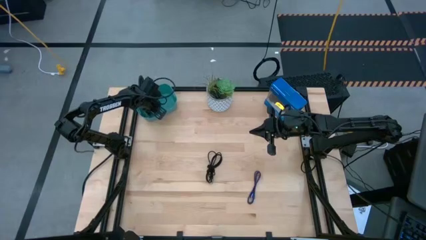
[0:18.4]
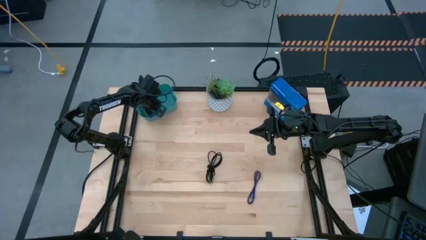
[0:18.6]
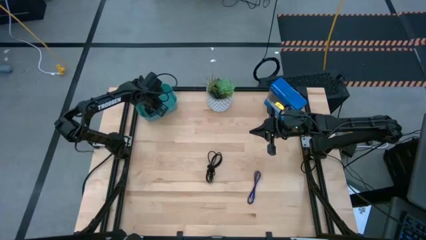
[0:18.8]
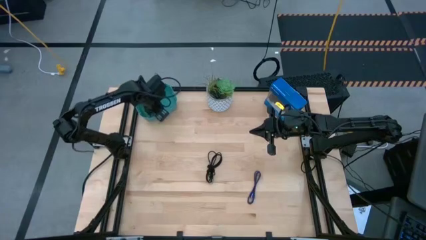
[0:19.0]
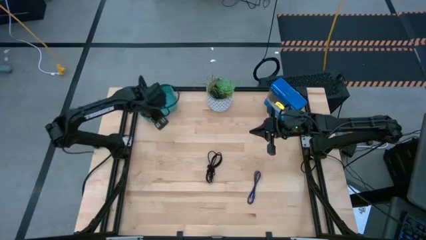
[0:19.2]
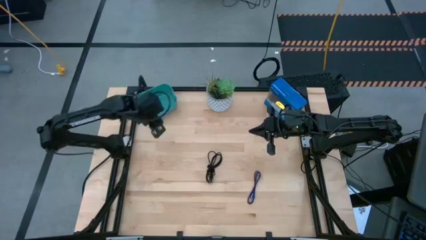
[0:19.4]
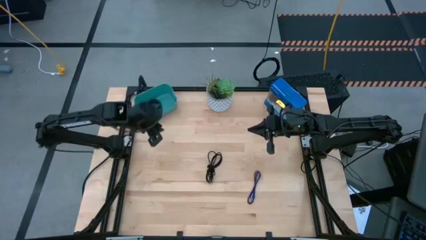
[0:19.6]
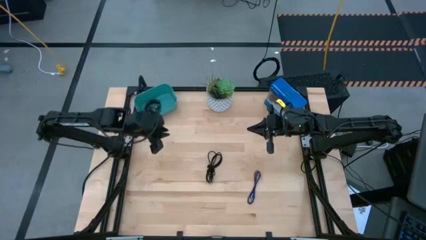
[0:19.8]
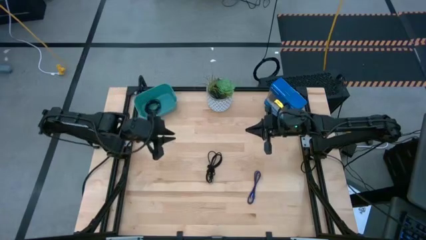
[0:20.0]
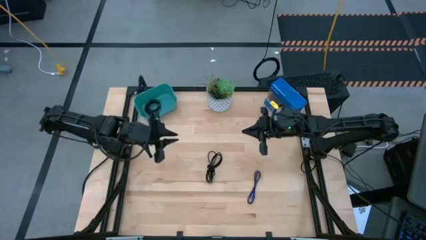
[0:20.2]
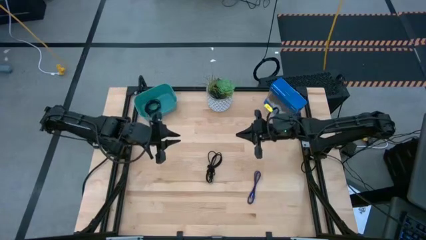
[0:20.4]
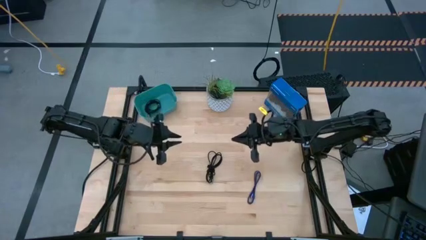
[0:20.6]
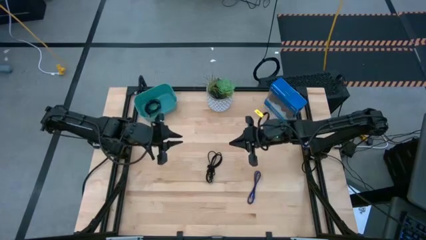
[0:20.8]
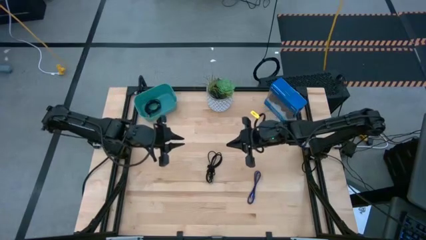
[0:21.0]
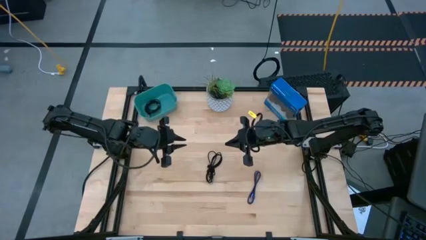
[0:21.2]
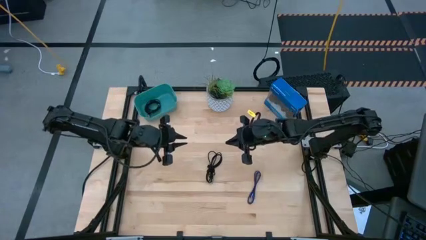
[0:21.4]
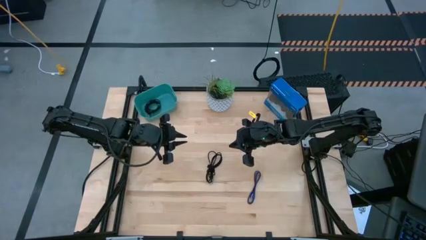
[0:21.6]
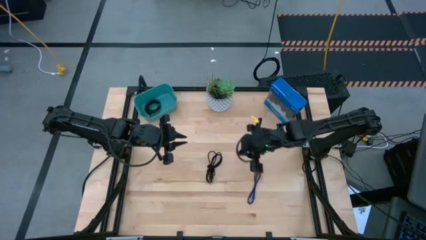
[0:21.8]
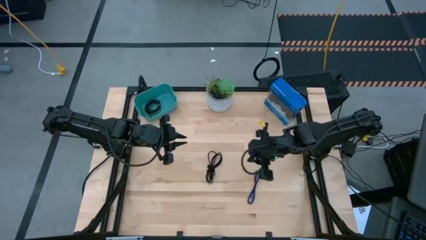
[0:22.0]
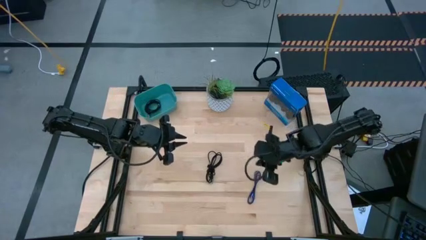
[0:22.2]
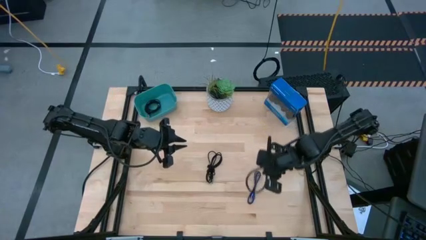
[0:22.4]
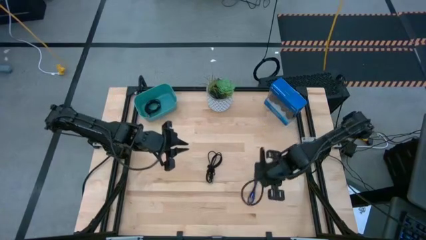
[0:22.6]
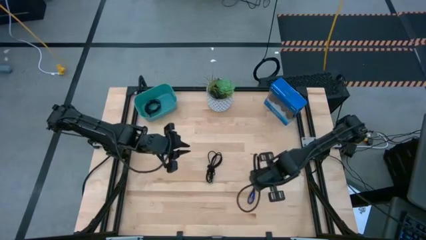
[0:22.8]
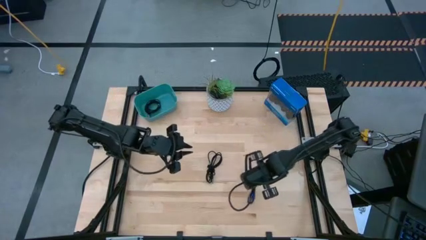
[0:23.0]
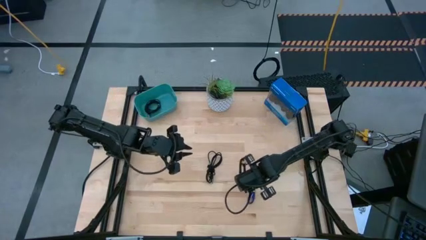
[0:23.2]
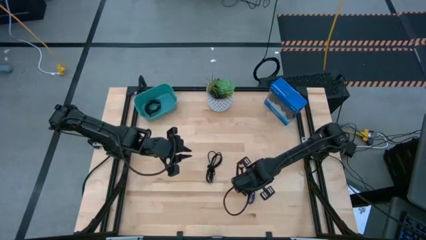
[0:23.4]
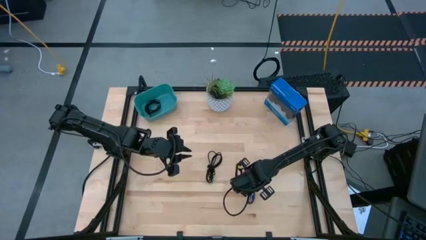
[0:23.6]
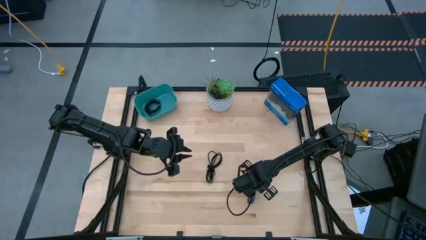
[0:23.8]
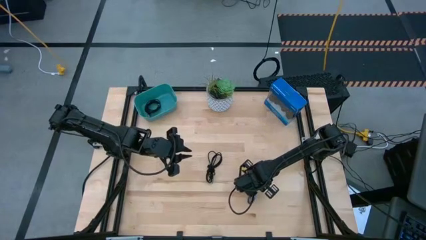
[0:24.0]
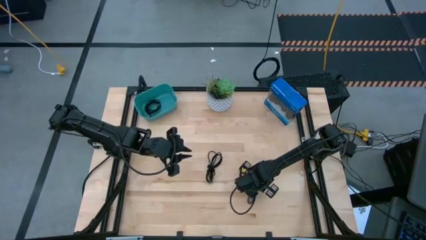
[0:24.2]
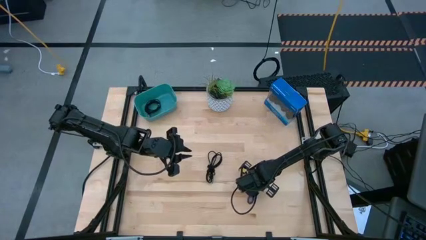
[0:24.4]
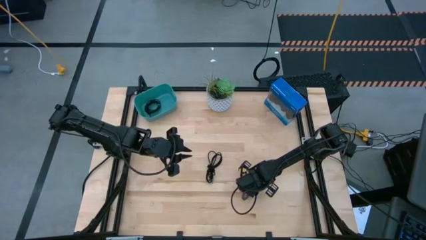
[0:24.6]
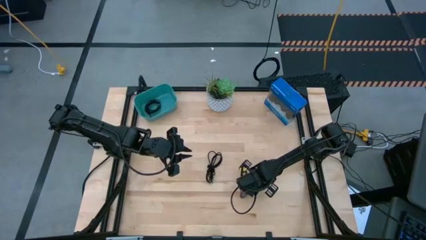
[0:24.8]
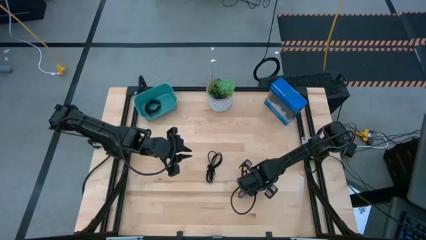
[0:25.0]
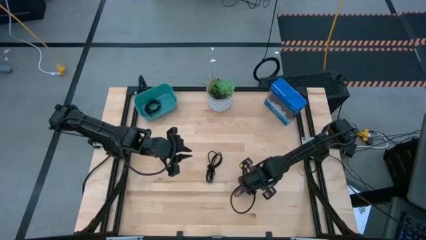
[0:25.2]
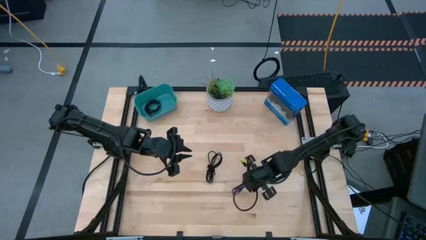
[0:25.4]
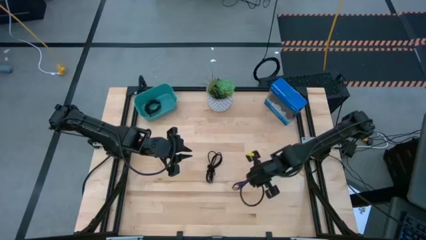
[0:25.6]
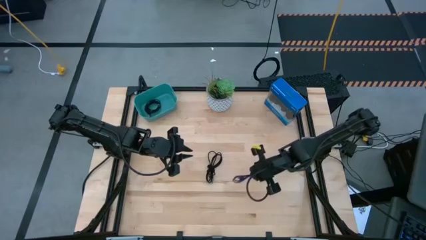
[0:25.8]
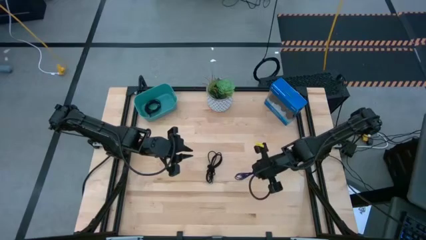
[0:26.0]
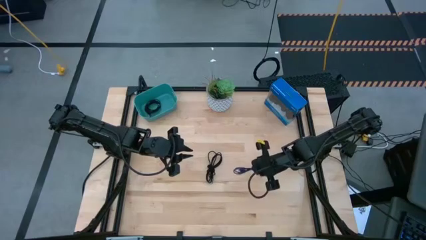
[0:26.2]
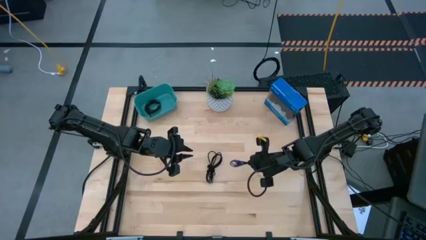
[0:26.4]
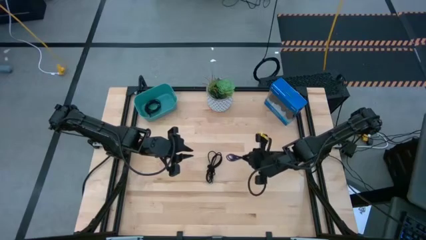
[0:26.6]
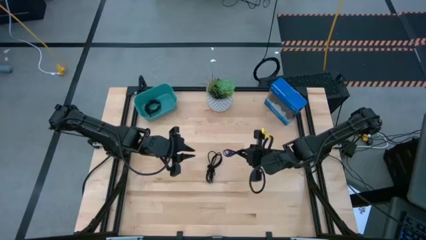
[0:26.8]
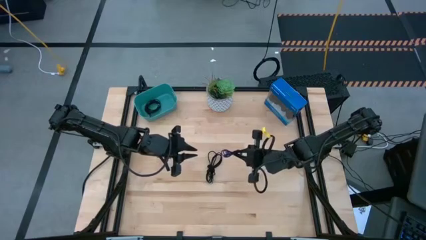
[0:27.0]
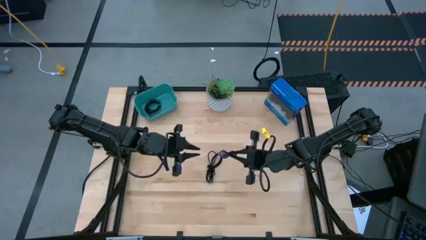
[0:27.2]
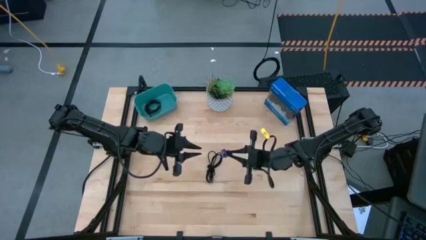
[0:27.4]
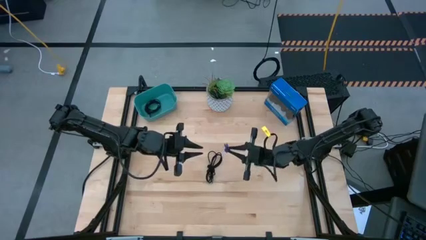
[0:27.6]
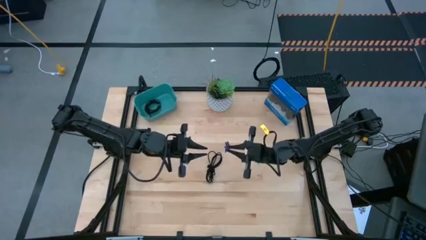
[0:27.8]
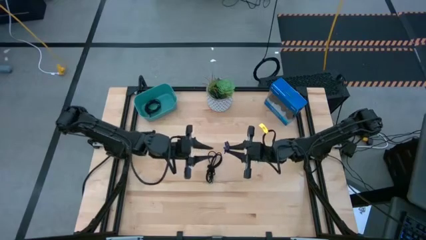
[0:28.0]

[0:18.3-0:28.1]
Task: Pick and place USB-C Cables
Put the violet USB cable into the blue bin

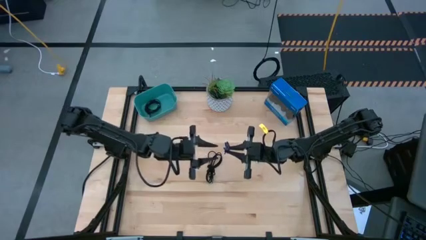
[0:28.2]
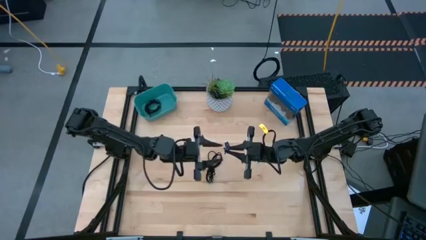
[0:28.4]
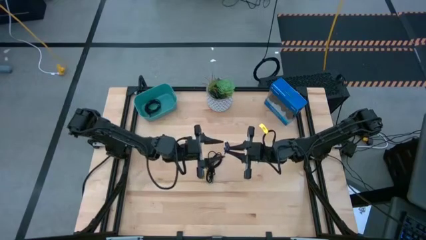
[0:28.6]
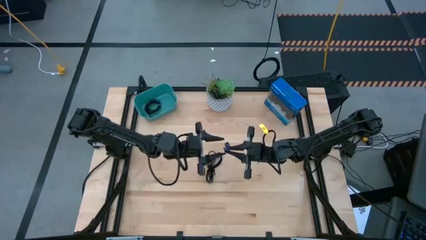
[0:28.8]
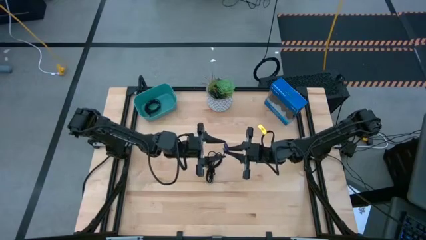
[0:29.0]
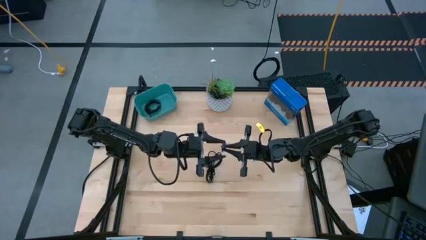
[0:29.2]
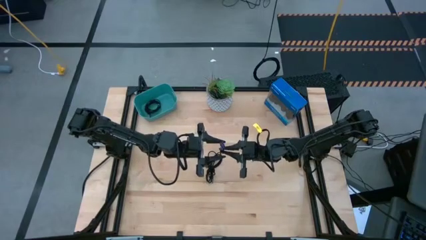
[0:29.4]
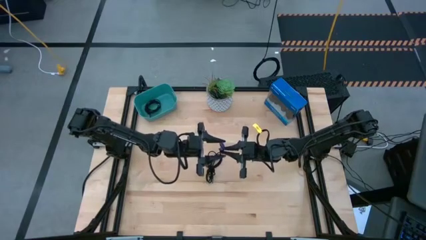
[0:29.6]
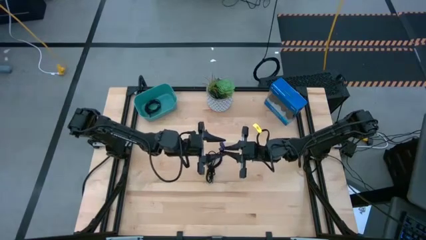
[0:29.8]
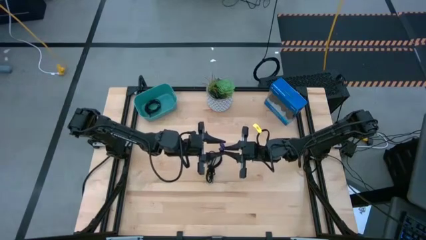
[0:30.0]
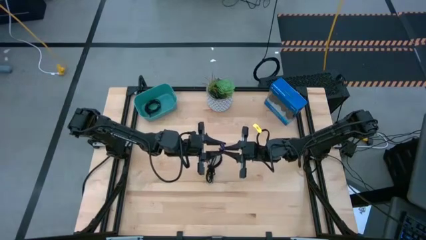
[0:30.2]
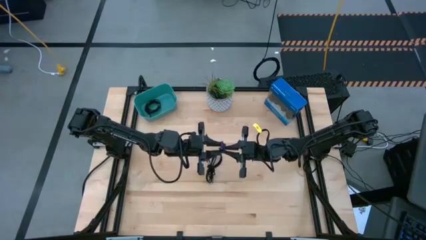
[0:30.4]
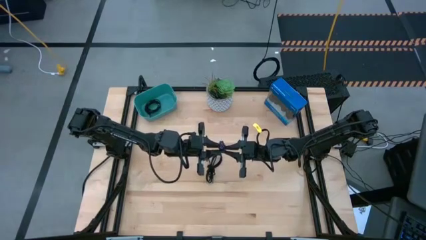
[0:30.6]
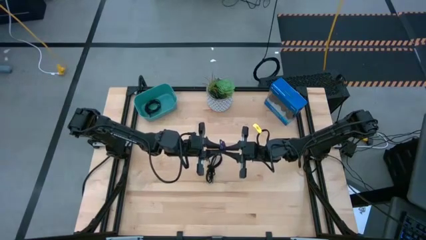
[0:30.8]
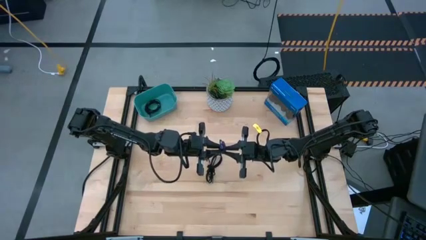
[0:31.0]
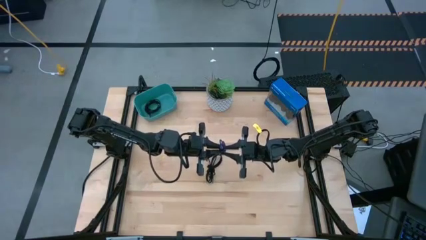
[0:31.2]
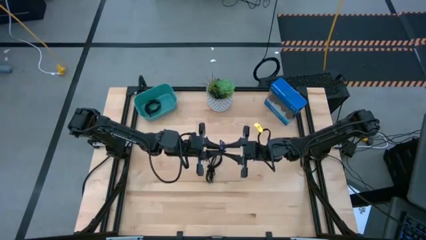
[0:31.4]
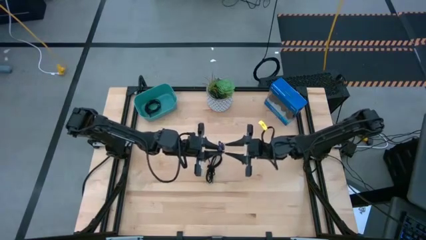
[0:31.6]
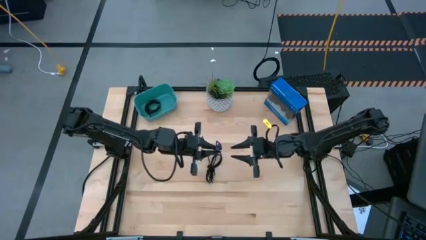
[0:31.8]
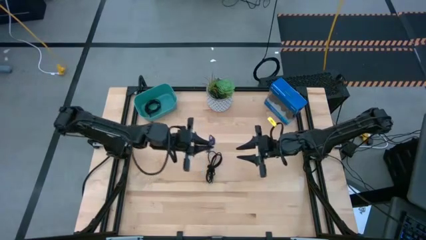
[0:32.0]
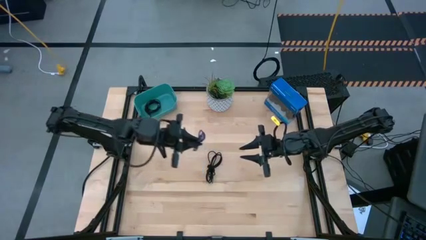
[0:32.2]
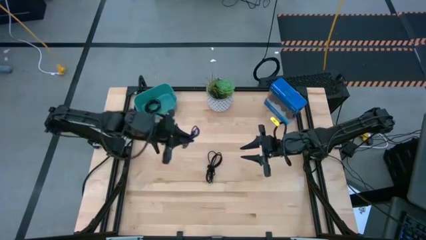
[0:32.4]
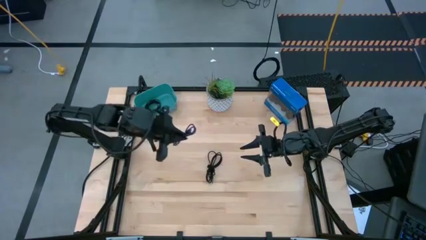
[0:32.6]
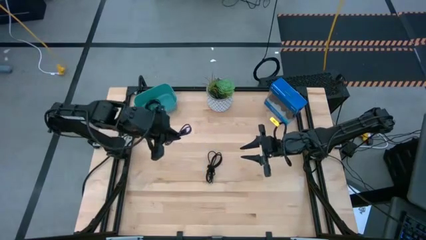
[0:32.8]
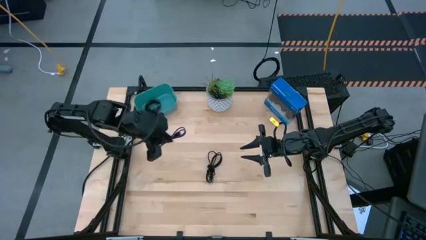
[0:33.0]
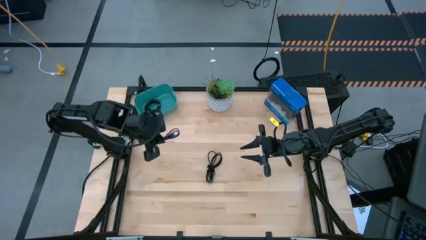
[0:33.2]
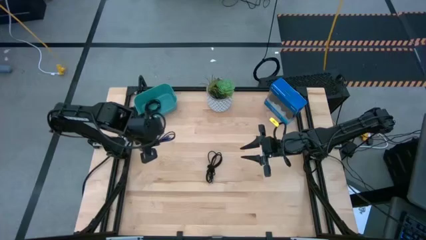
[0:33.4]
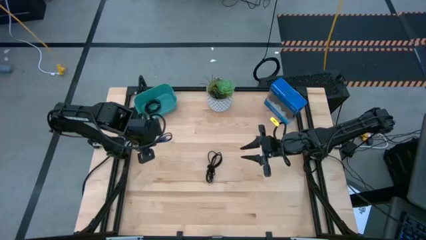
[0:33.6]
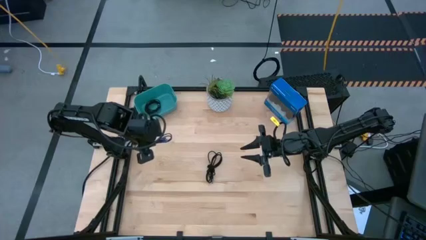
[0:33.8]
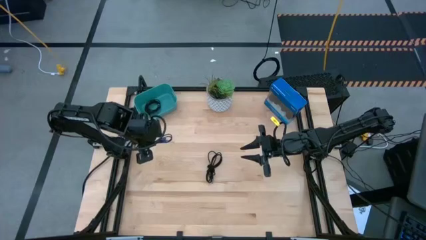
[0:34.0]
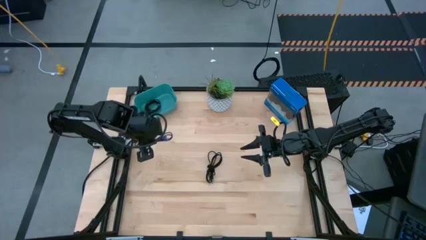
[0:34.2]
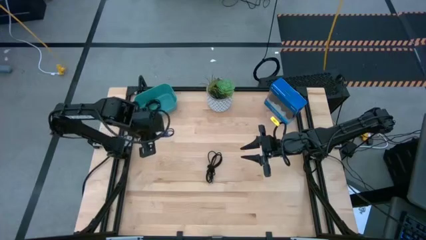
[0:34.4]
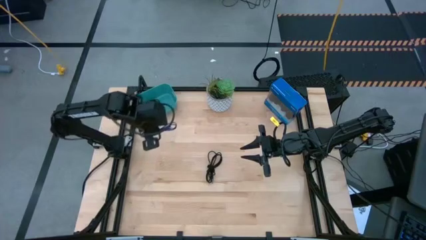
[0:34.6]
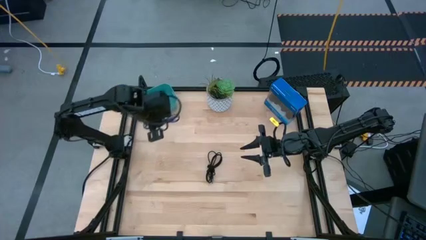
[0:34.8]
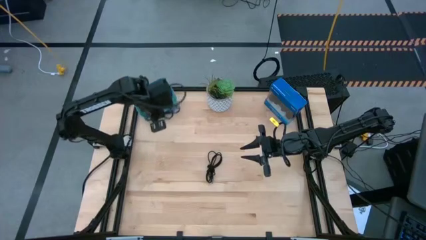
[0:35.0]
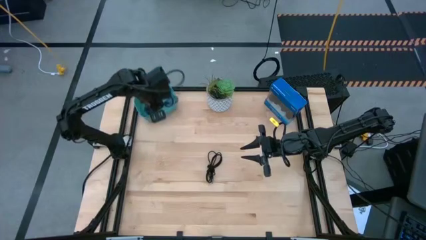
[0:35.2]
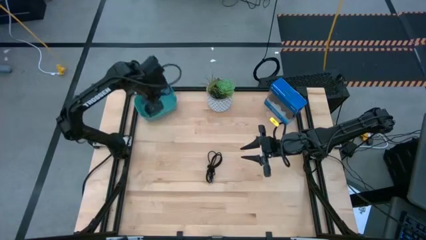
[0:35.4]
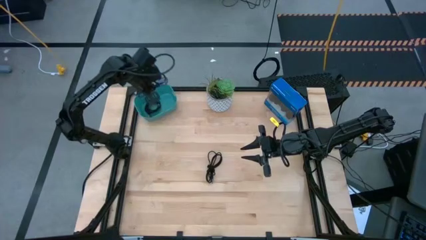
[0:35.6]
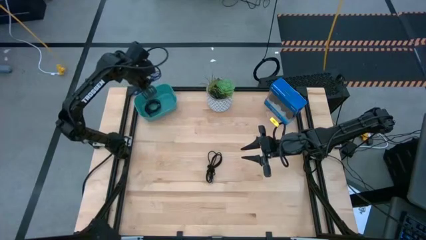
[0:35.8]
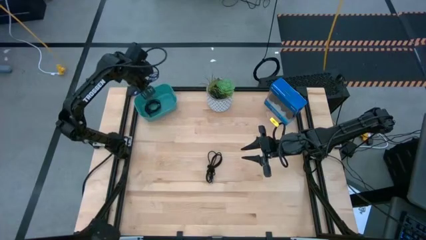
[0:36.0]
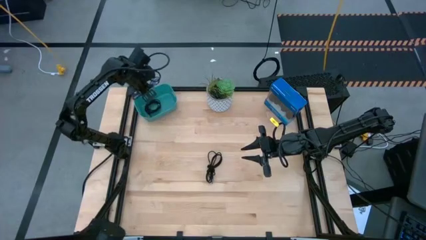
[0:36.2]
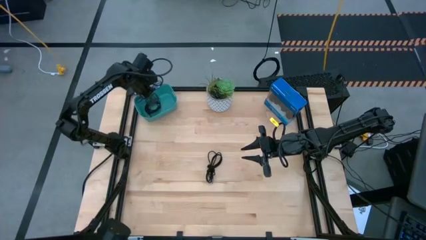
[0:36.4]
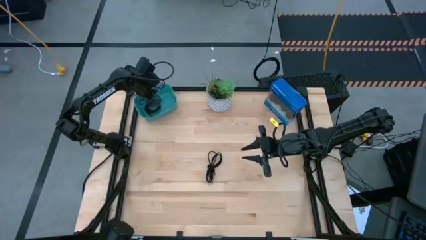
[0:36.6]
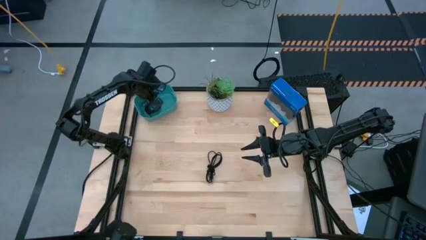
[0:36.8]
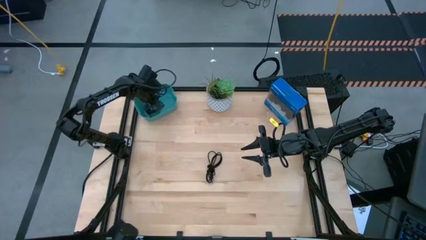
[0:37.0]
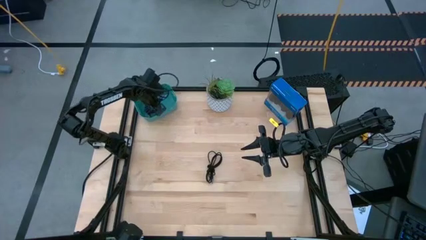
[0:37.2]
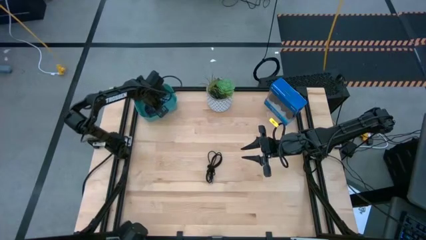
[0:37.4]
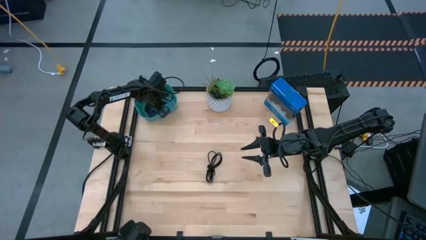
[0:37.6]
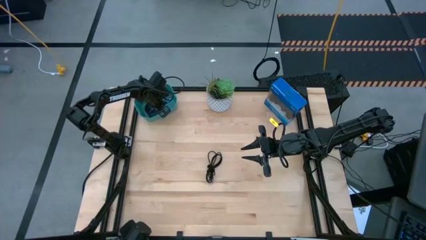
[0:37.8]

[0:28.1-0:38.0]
Put the violet USB cable into the blue bin
